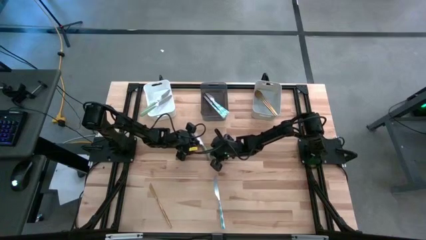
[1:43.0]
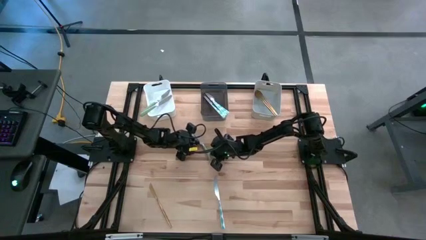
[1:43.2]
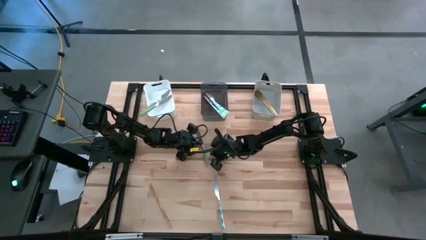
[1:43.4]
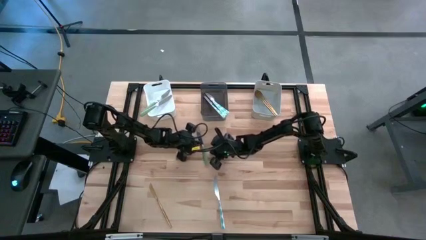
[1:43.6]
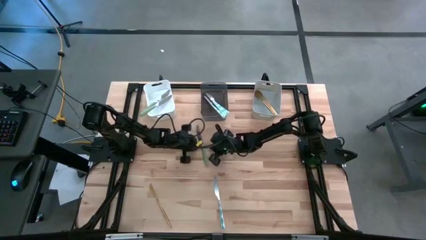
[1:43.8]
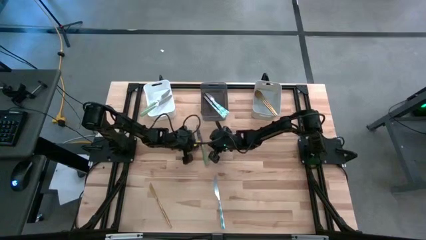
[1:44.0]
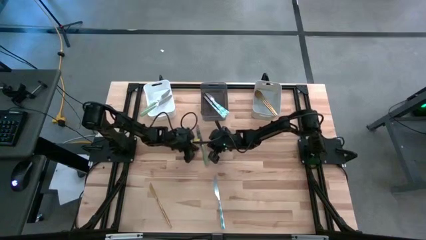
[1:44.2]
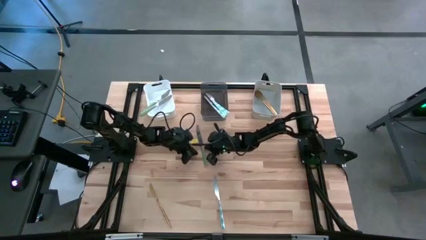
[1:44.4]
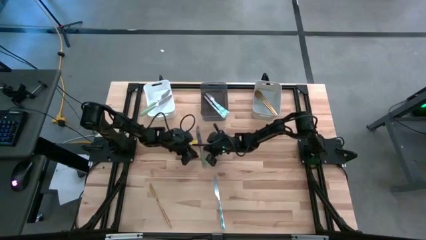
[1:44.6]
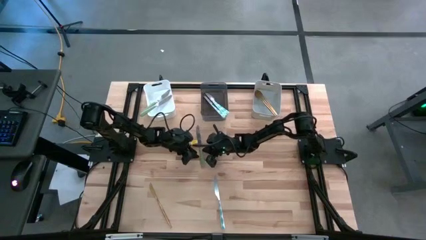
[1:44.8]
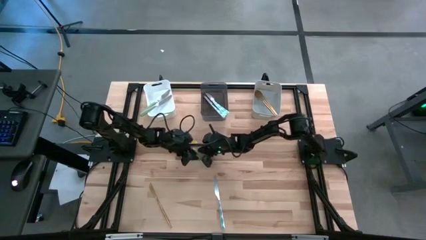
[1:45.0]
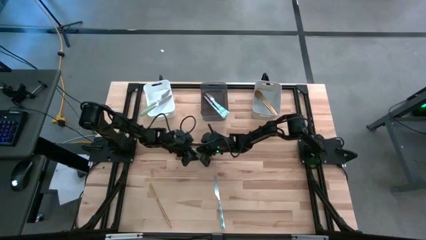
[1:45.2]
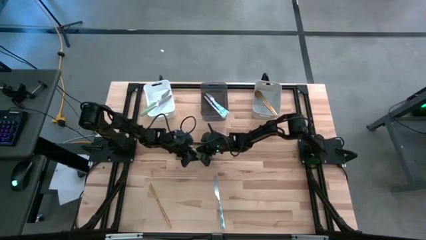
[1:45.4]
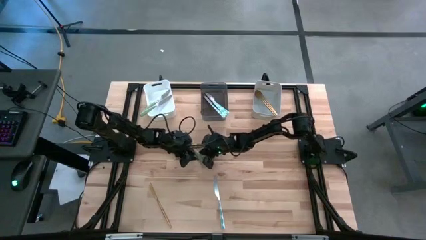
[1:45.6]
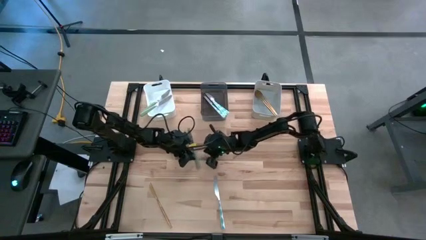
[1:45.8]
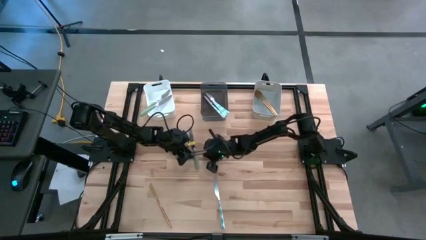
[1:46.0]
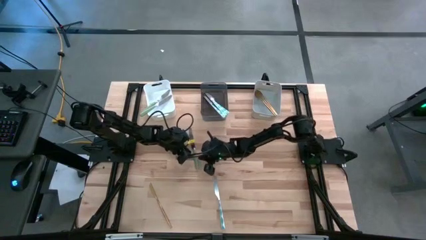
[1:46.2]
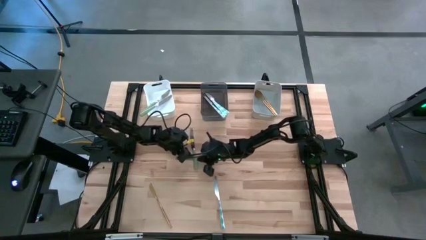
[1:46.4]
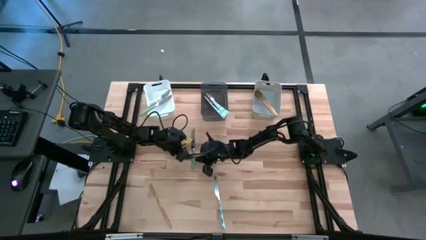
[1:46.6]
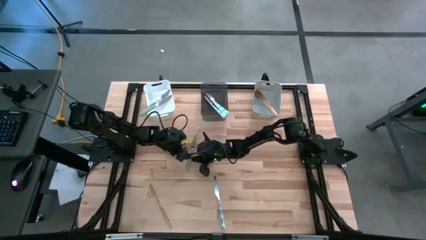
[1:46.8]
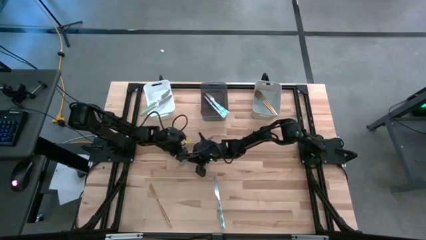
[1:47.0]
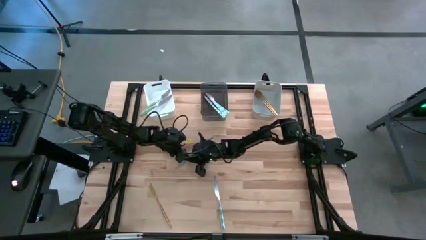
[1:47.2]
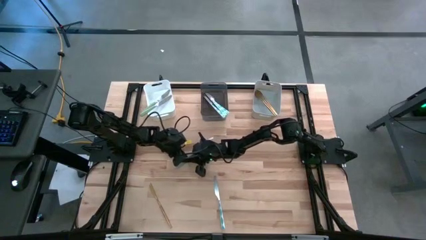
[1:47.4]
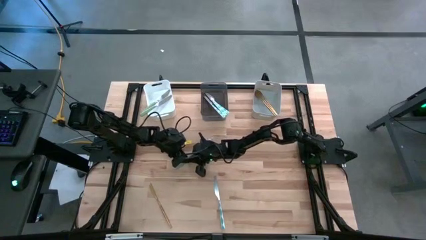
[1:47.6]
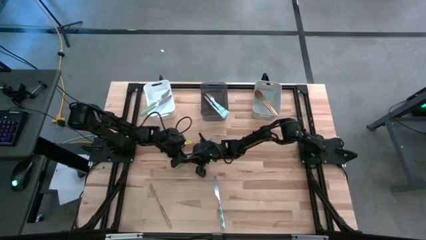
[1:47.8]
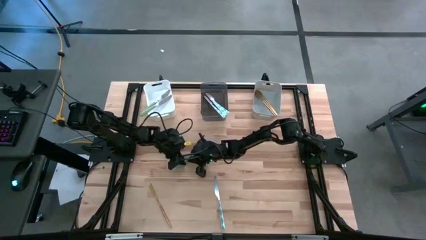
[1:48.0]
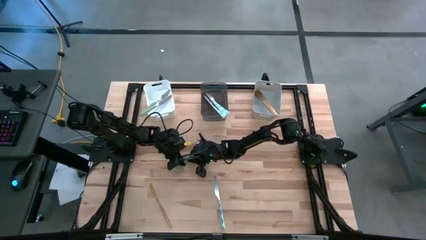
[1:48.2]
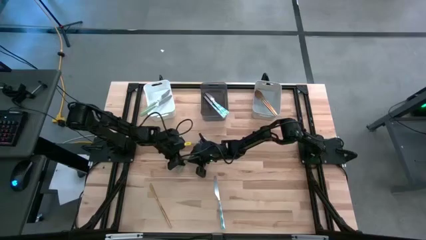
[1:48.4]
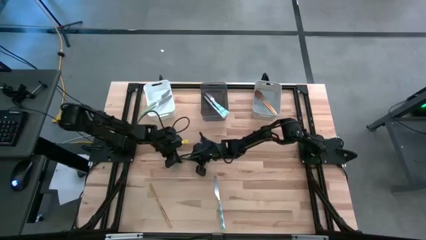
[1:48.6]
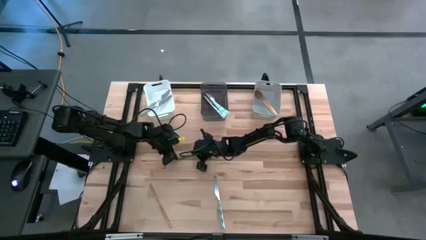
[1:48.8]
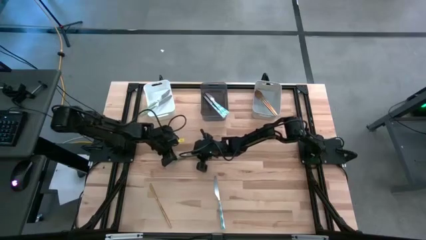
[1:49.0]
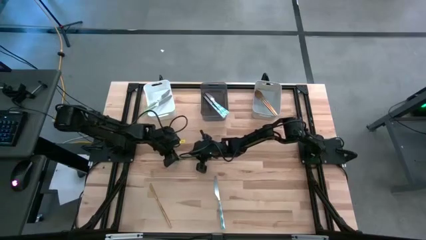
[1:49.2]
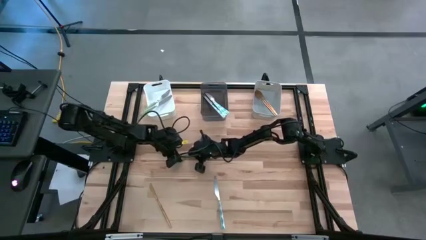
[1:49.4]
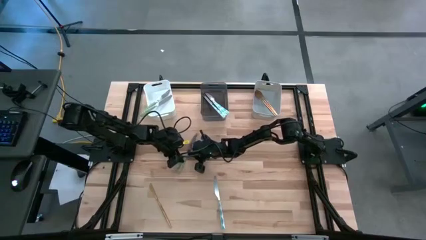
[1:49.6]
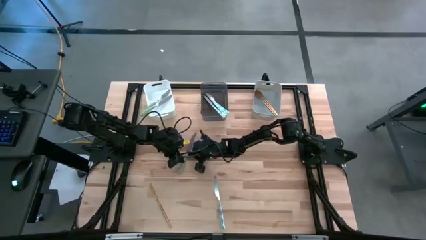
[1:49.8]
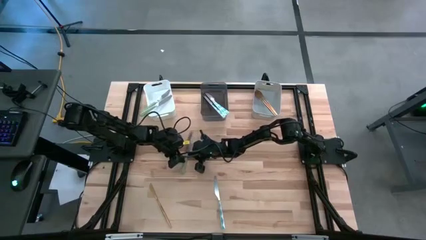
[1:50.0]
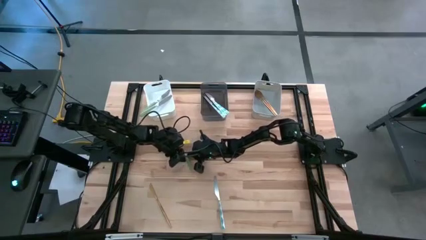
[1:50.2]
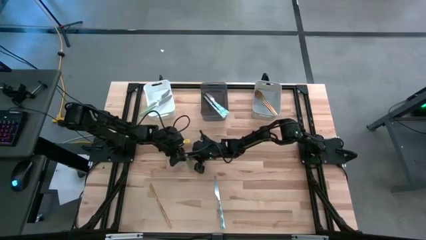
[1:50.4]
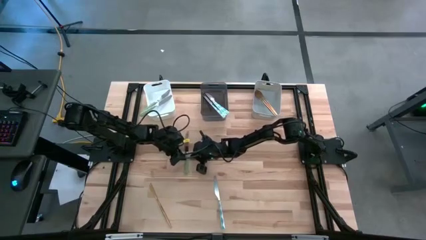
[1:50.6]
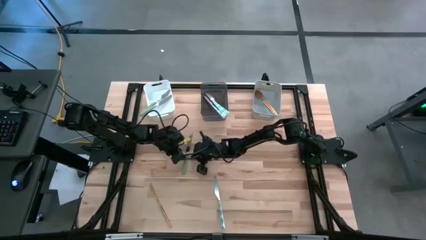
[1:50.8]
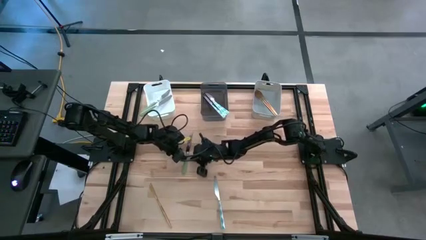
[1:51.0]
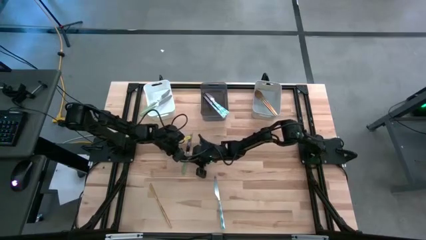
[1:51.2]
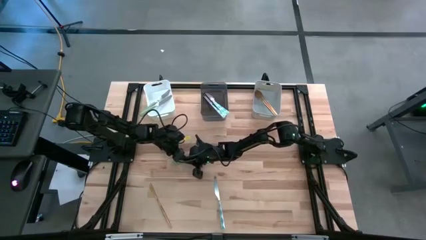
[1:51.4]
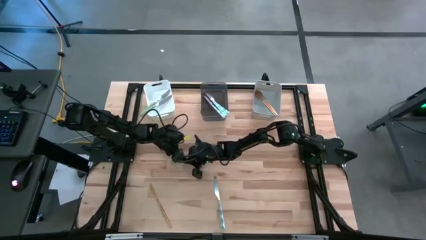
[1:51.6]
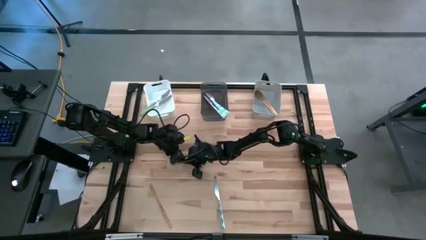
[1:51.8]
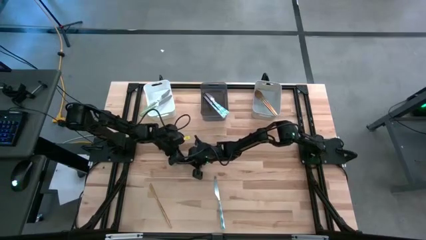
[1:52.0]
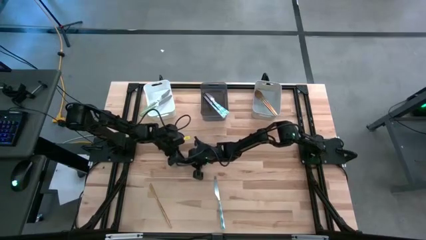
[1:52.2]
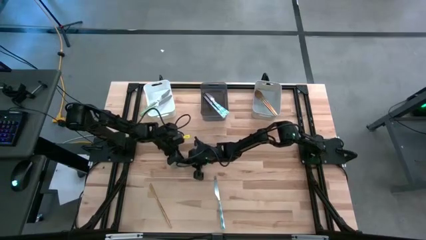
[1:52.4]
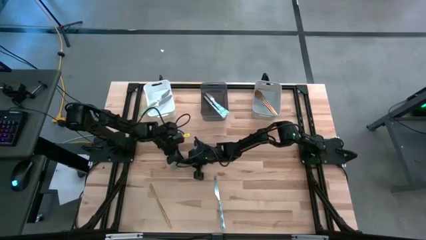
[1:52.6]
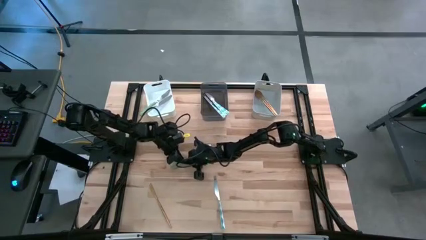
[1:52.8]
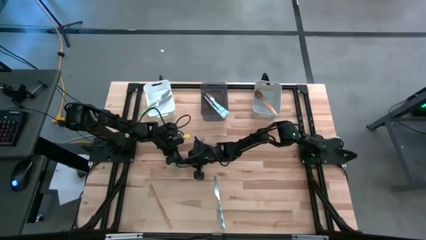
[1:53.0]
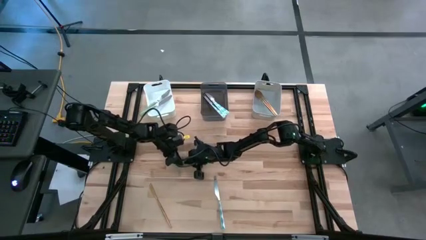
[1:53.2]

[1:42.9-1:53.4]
Task: Sort silverware by color (type)
Put the green table knife into the white bin

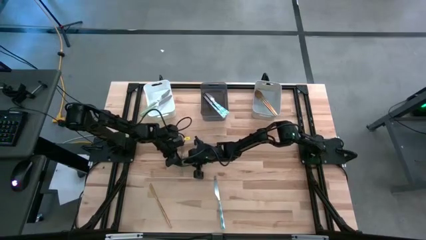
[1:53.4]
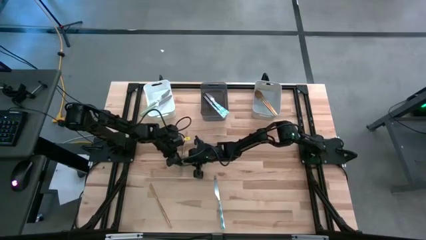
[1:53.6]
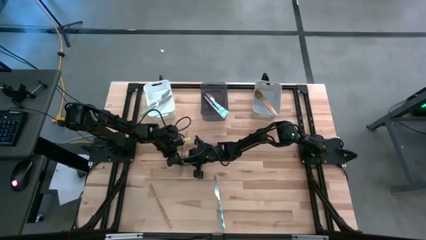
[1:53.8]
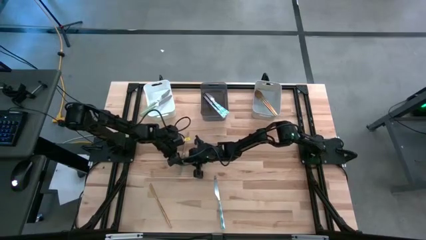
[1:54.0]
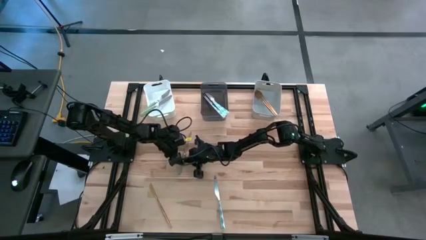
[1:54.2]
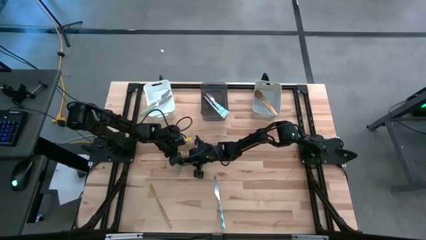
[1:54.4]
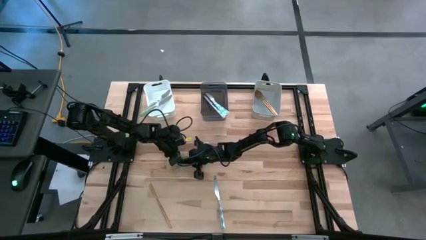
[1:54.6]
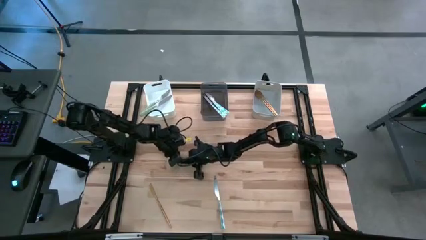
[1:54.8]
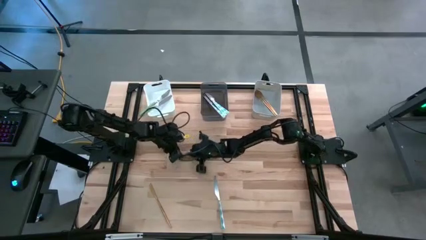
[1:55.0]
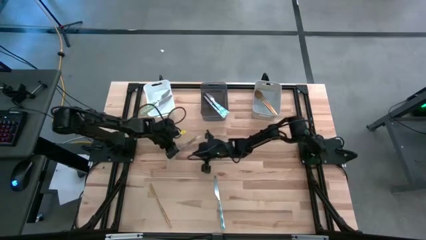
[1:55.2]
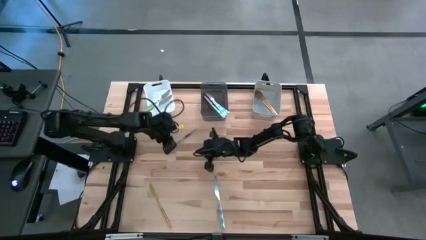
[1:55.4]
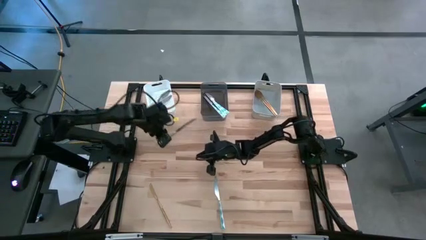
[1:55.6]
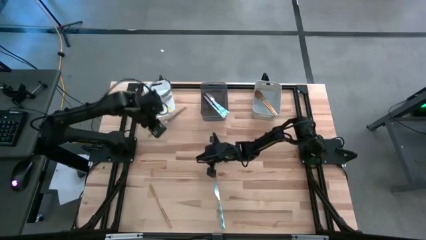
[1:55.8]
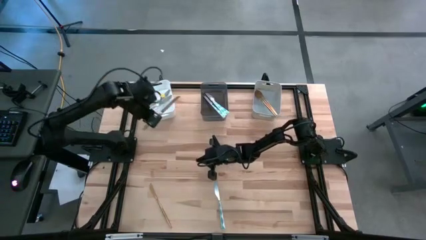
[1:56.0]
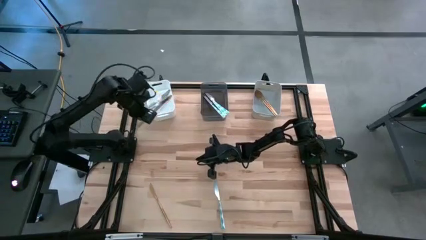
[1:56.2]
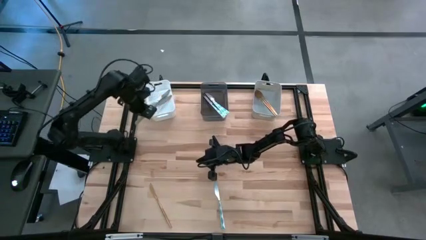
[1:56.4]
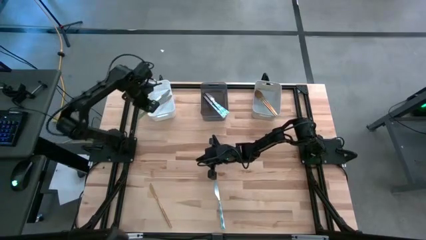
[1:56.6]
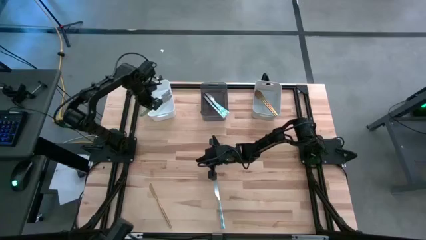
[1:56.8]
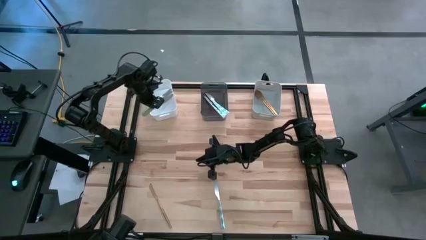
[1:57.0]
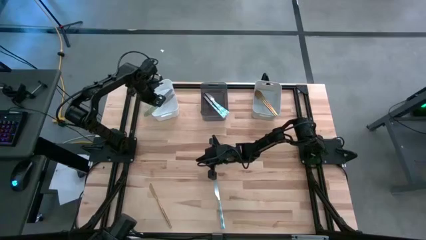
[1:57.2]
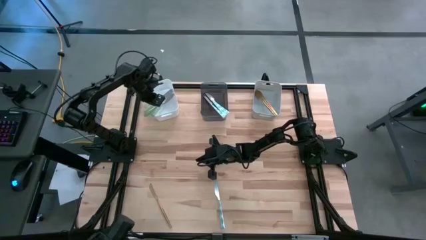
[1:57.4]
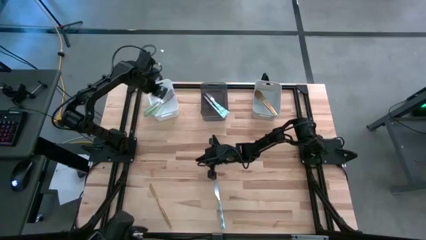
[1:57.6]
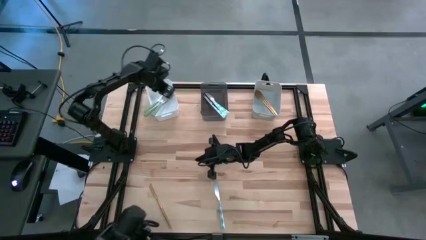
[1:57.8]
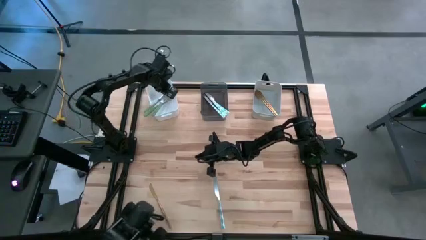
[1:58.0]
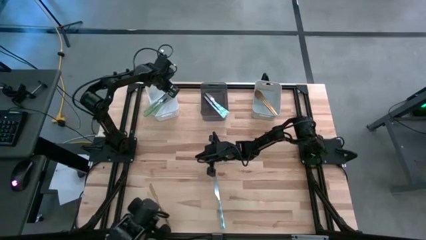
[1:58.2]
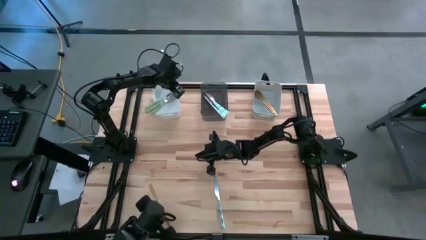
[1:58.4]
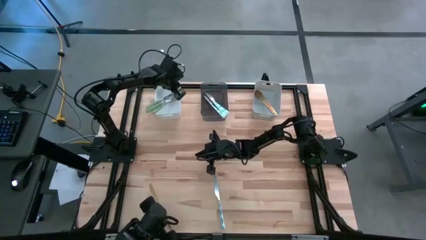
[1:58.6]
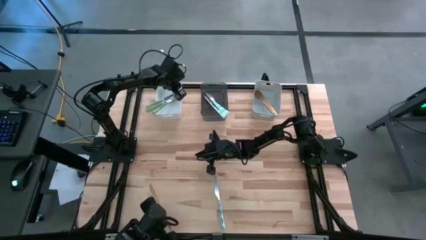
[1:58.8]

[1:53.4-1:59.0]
Put the green table knife into the white bin
